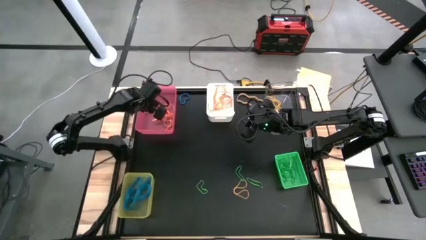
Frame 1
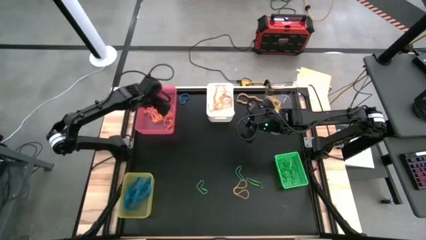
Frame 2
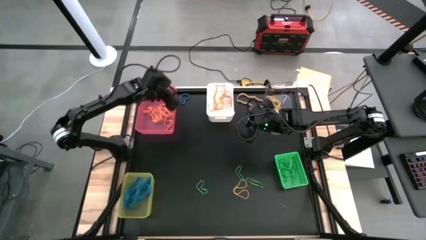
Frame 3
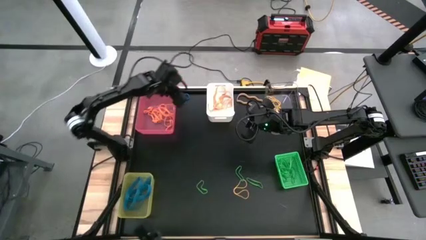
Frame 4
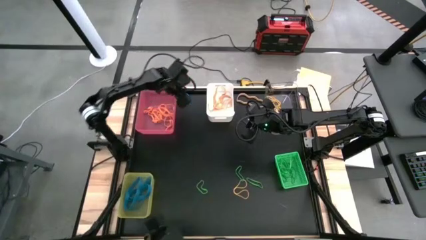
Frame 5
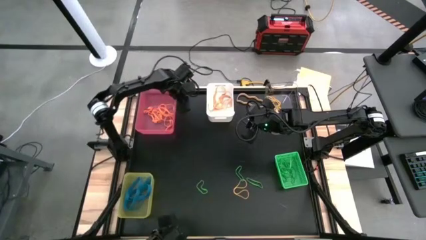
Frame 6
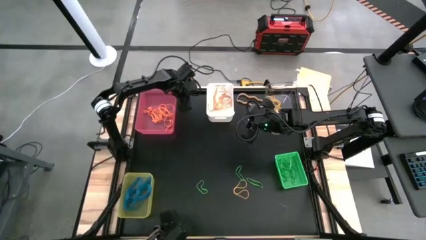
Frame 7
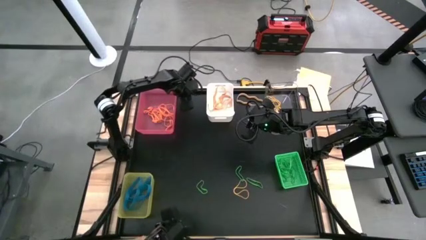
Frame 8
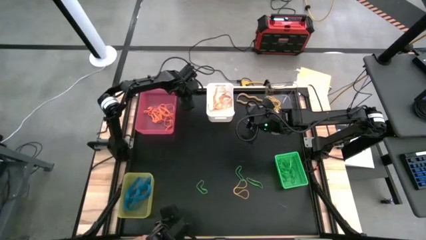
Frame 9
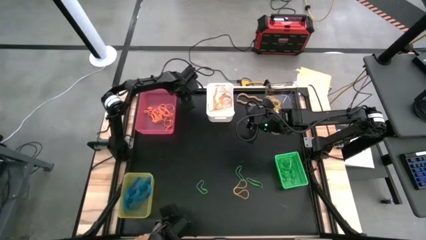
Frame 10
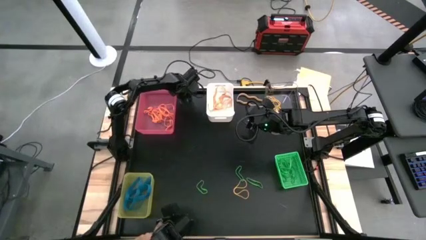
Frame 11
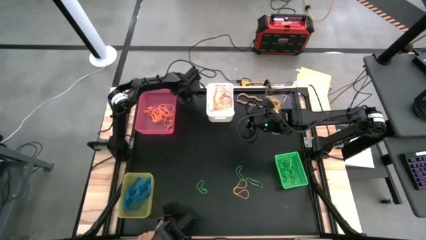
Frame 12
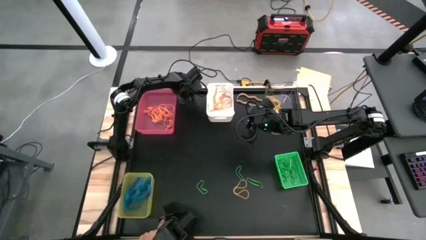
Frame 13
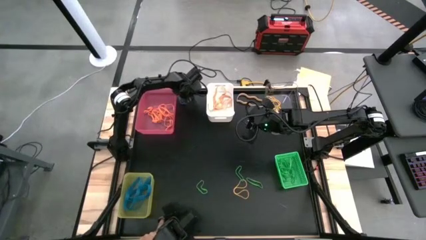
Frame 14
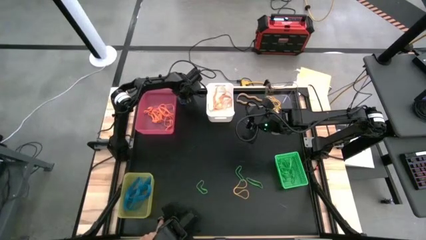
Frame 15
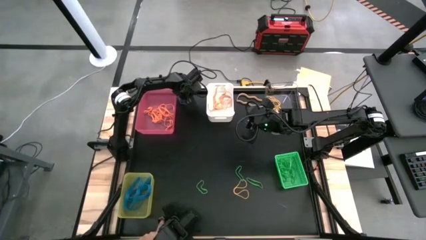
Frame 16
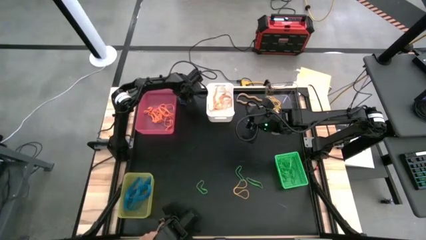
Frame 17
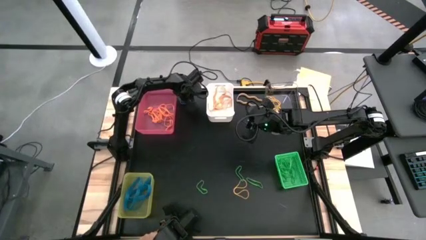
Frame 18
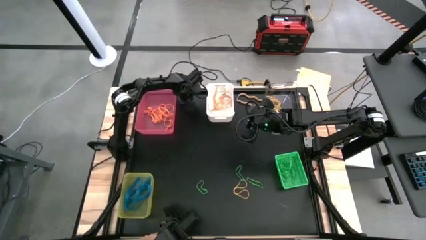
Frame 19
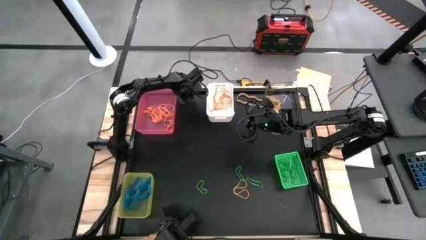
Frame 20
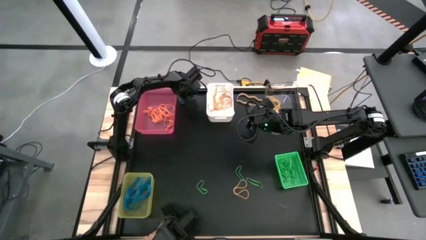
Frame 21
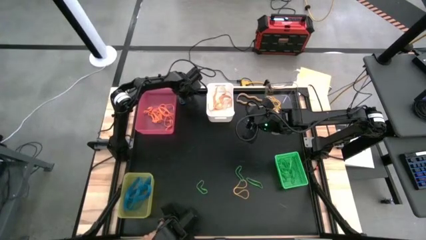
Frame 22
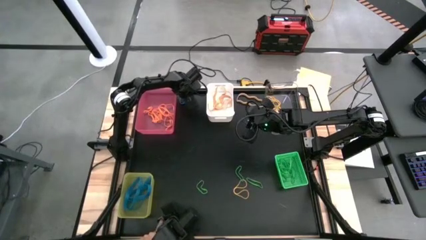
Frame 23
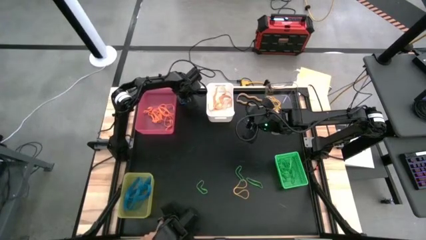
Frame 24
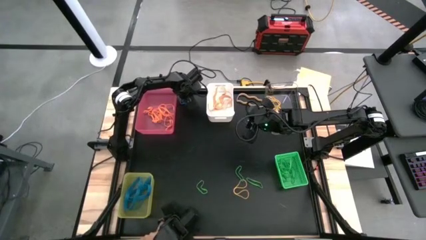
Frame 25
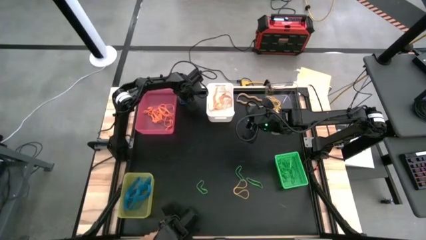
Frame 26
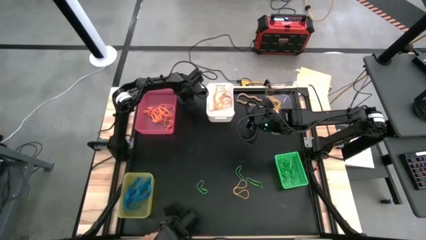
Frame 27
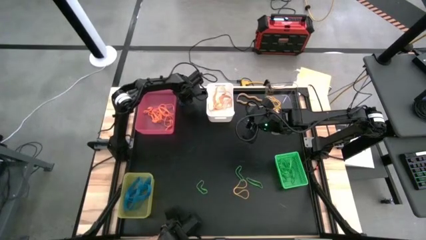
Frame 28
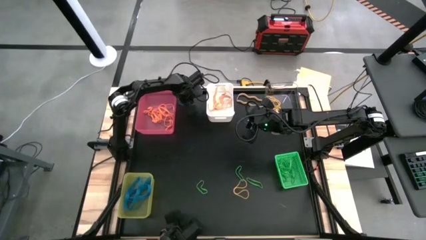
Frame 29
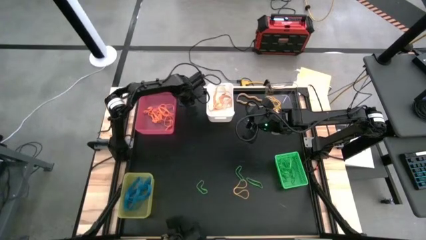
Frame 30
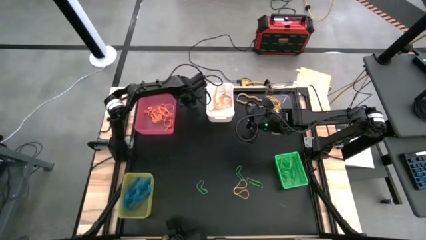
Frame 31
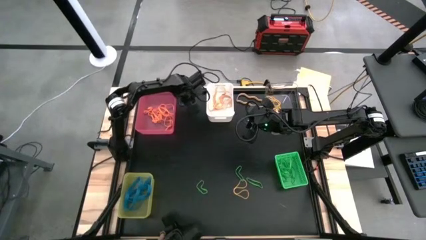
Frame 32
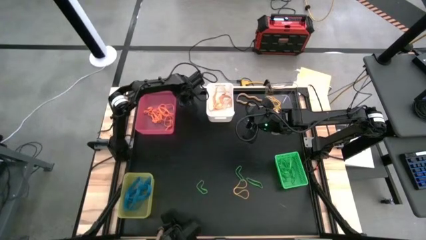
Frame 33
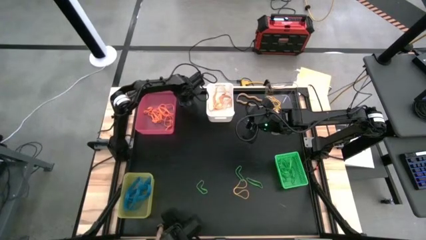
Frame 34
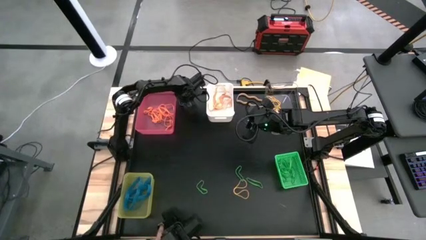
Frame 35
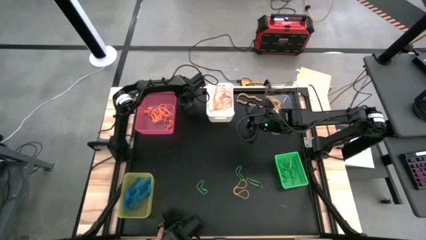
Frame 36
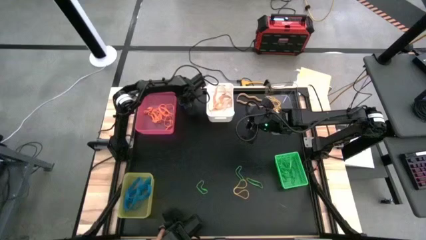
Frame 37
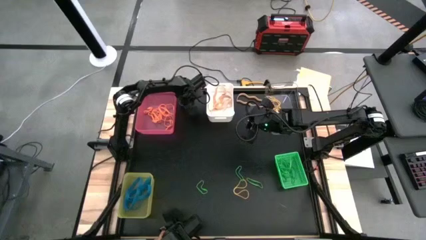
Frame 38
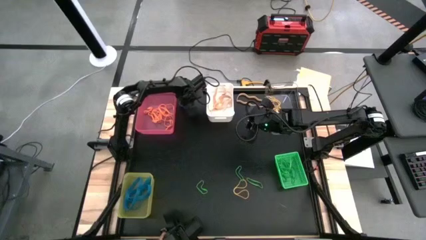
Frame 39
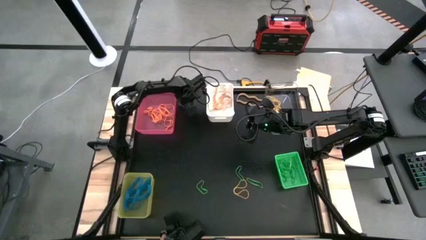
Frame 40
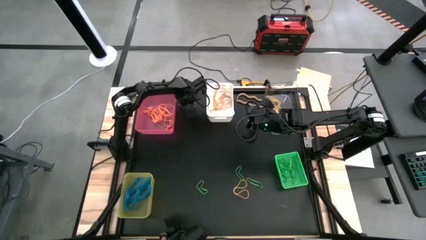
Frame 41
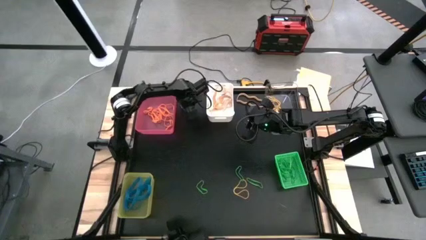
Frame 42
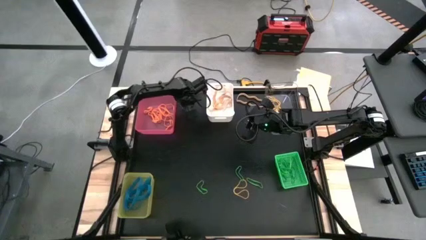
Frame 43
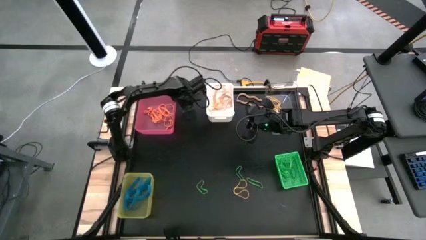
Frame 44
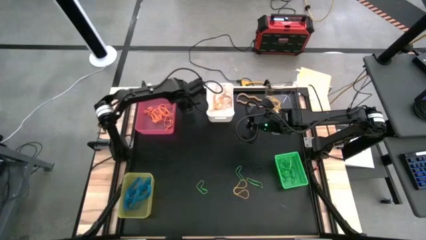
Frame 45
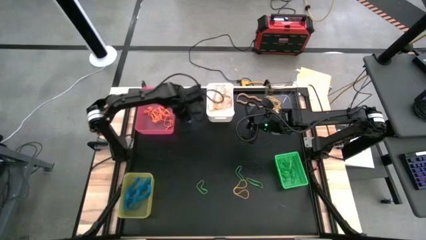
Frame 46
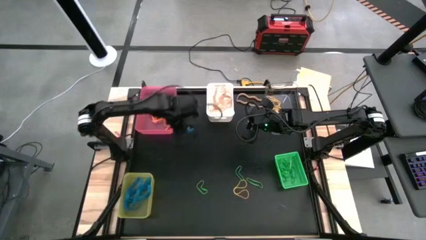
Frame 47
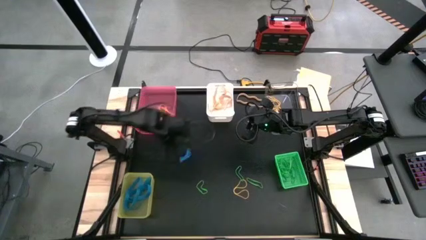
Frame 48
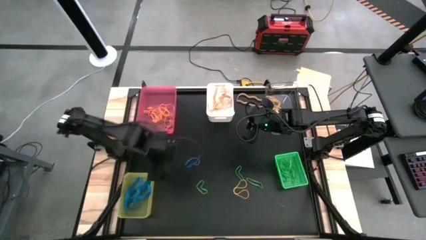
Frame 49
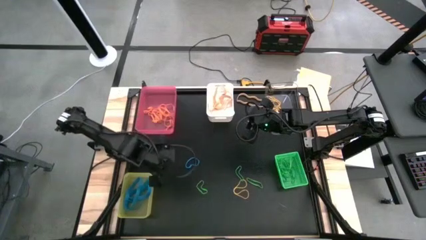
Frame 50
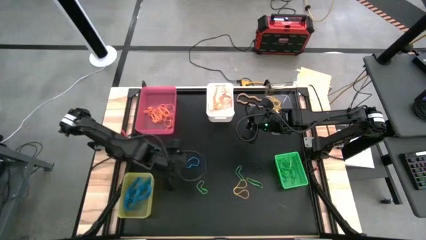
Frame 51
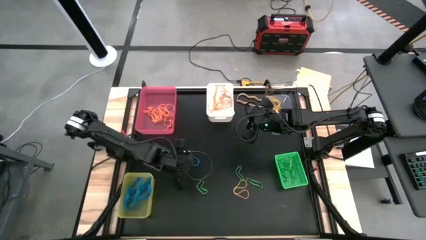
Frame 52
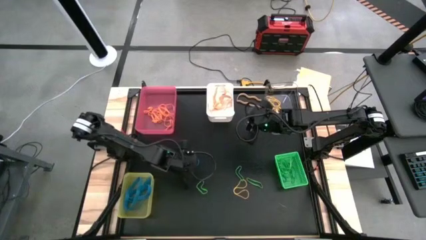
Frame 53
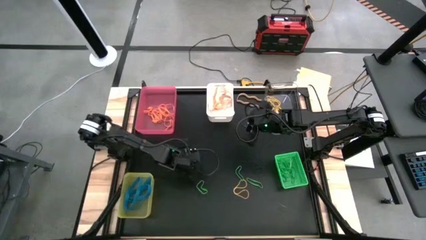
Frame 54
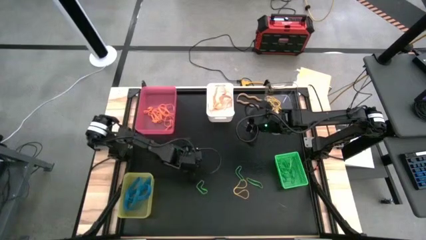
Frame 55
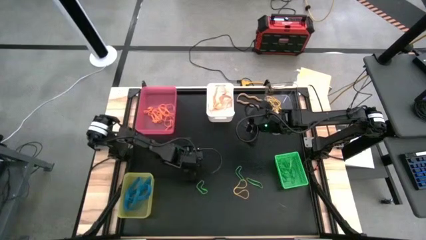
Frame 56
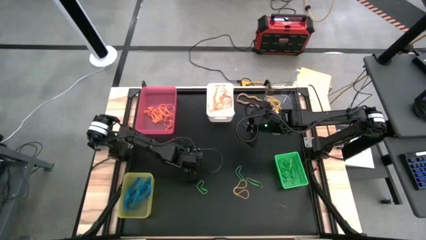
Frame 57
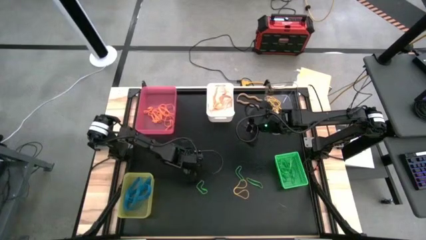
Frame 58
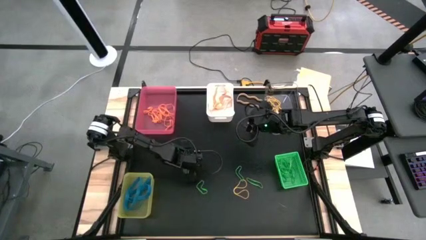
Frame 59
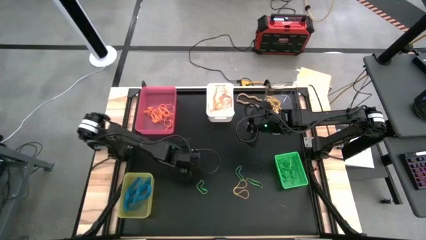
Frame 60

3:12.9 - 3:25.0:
Task: Sort rubber bands into baskets
Put the blue rubber band into the yellow bin

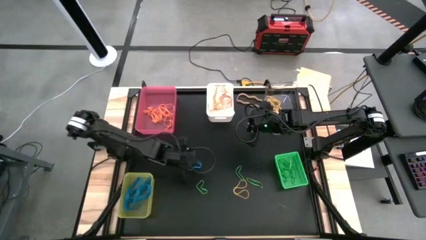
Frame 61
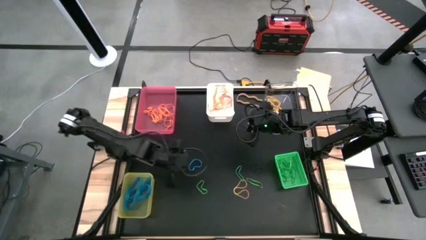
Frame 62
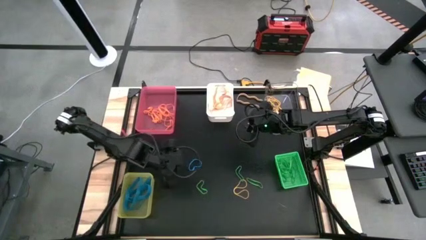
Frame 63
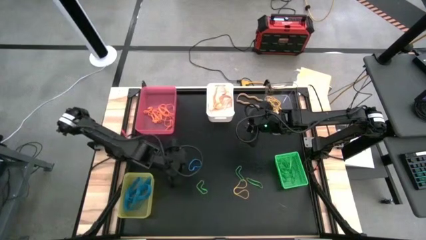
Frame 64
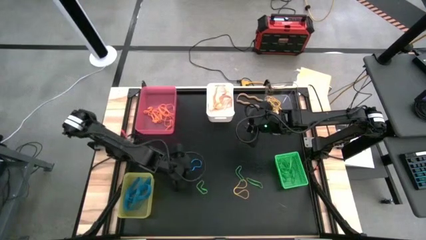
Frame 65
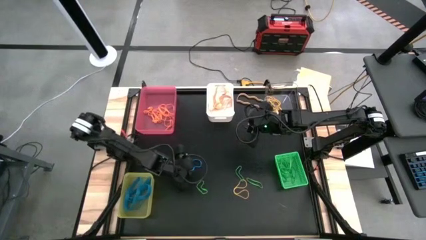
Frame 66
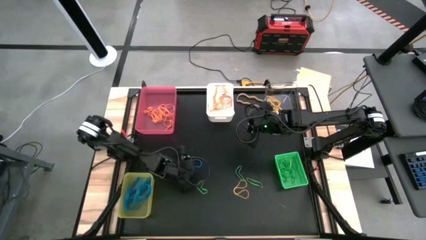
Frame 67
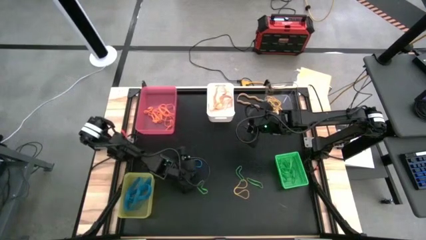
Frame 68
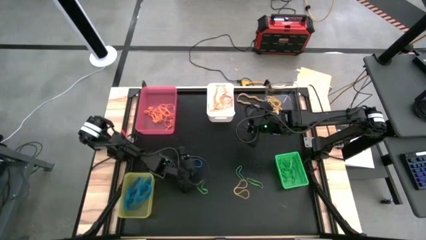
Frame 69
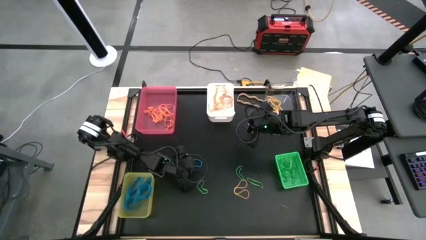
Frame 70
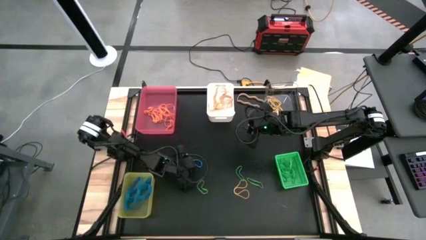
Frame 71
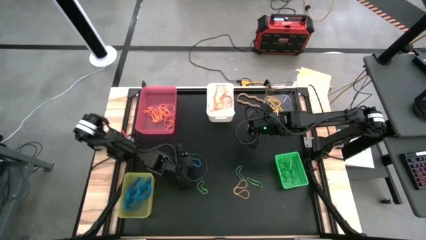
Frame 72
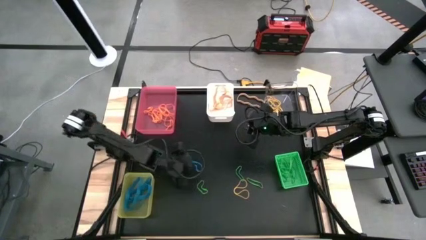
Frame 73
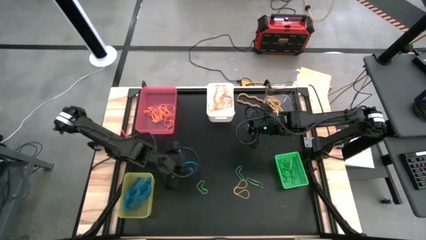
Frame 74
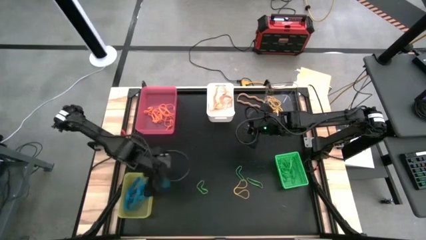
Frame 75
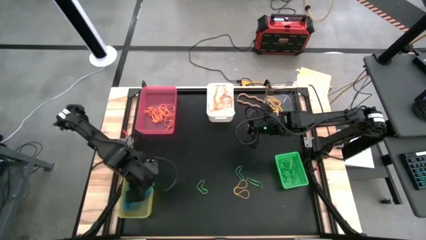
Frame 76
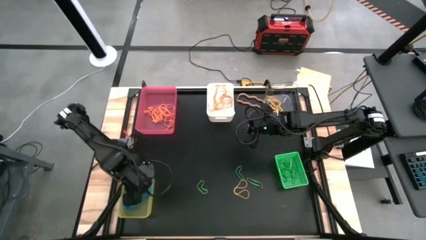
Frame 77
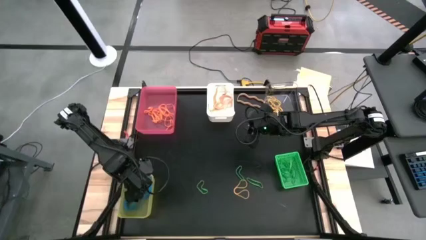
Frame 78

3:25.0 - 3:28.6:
Put the blue rubber band into the yellow bin
